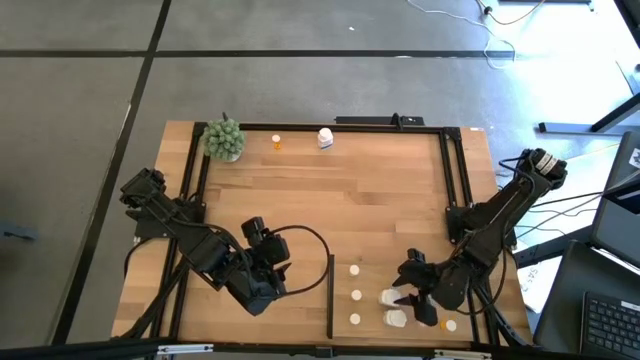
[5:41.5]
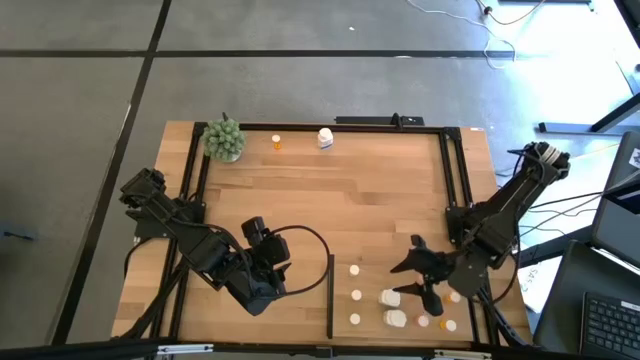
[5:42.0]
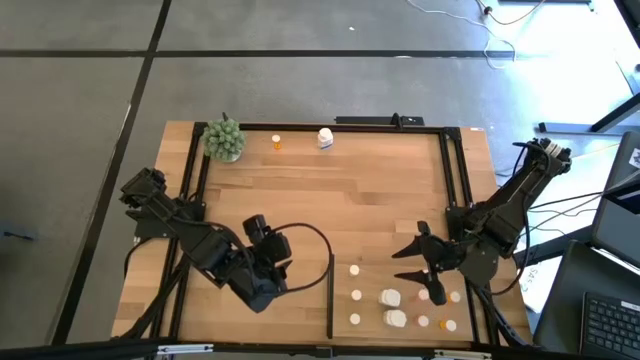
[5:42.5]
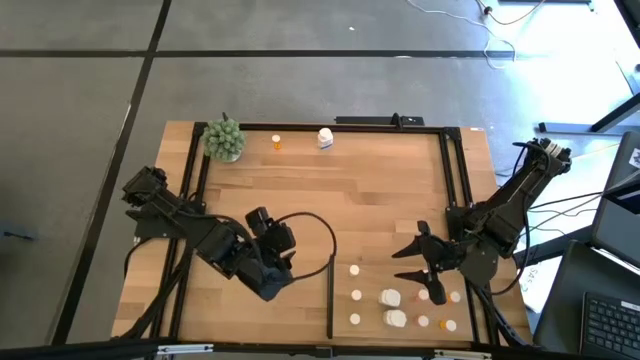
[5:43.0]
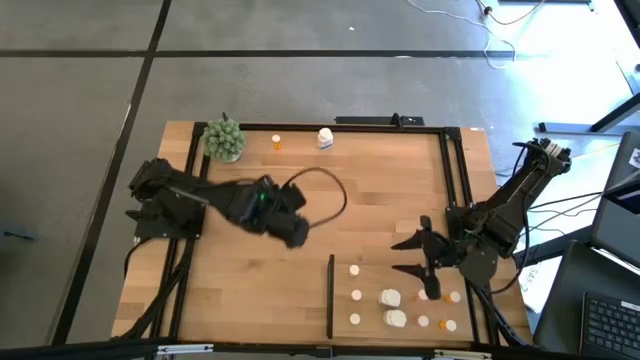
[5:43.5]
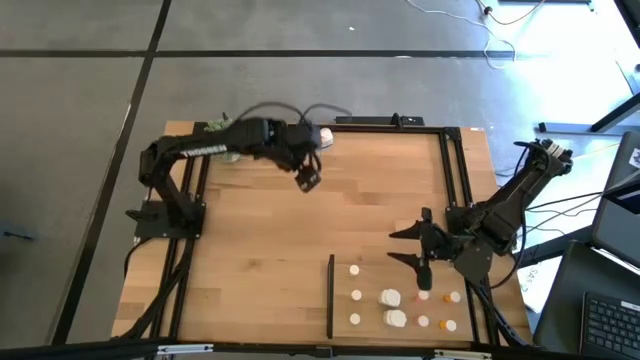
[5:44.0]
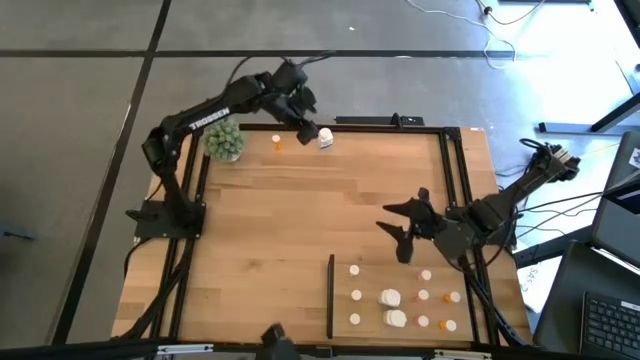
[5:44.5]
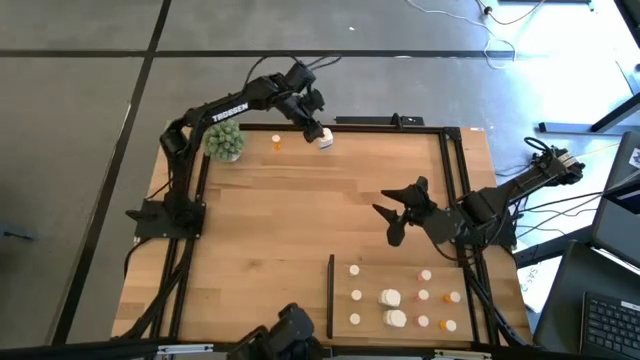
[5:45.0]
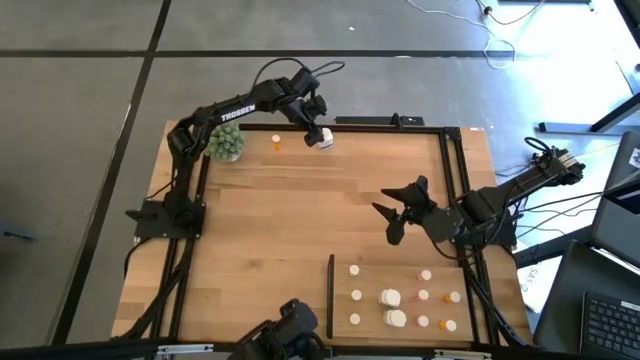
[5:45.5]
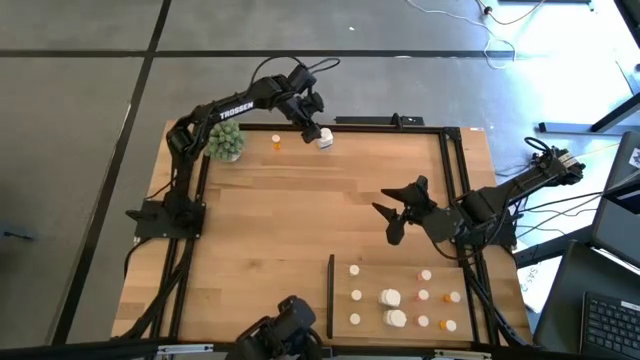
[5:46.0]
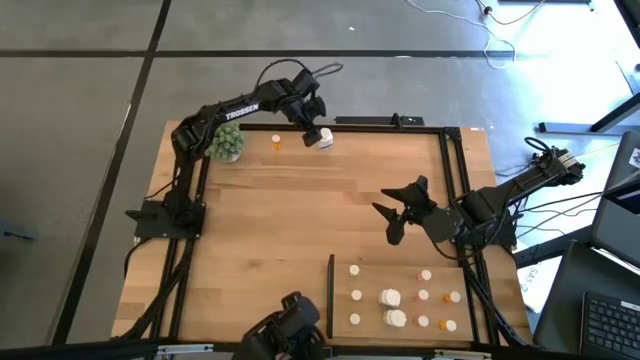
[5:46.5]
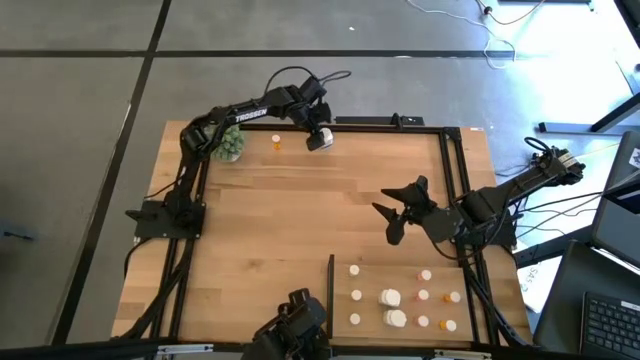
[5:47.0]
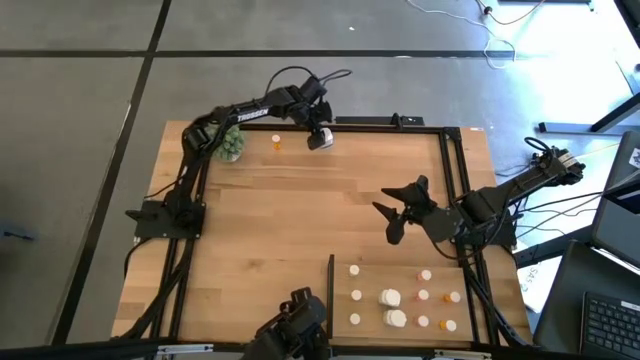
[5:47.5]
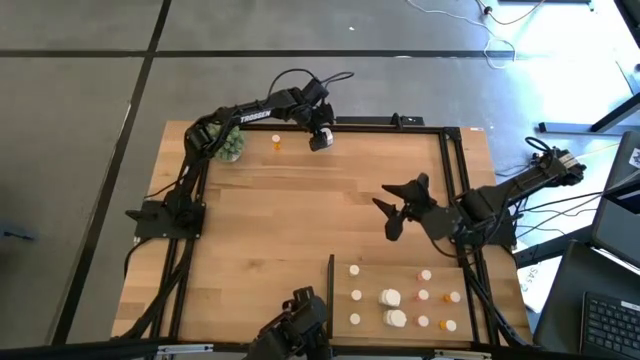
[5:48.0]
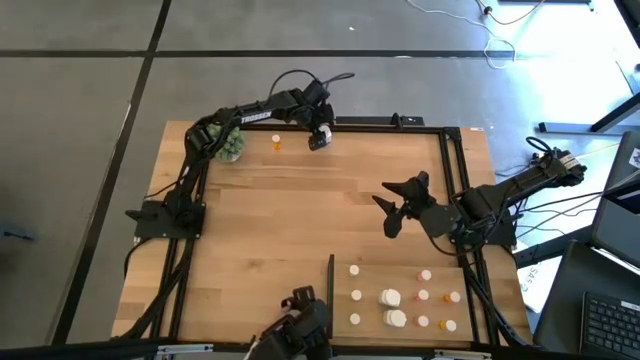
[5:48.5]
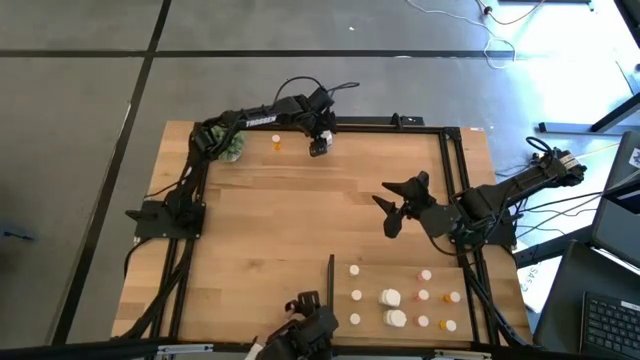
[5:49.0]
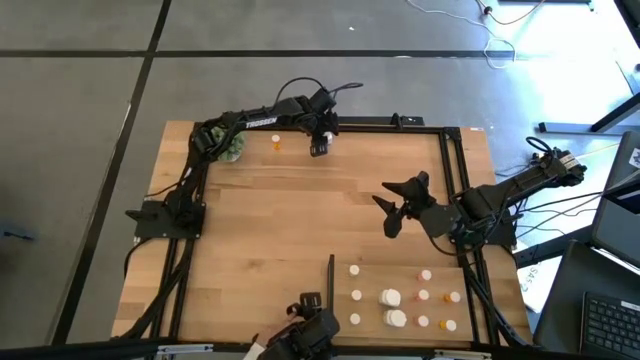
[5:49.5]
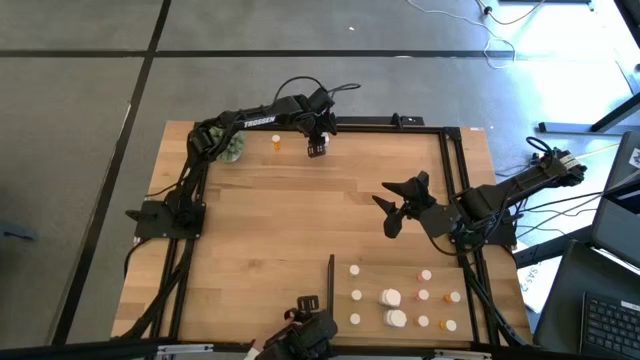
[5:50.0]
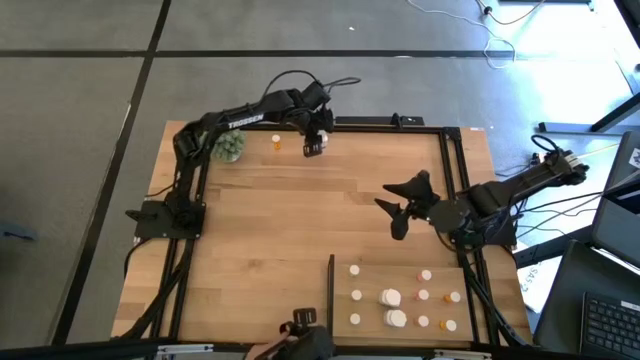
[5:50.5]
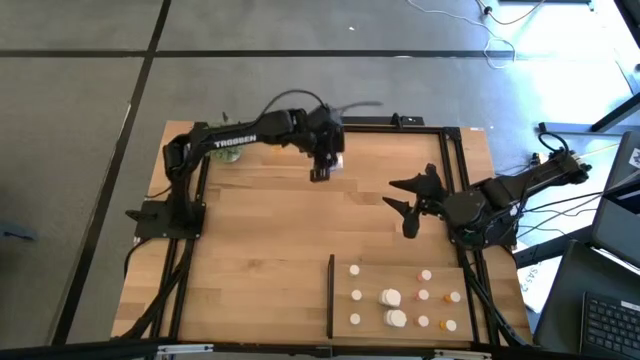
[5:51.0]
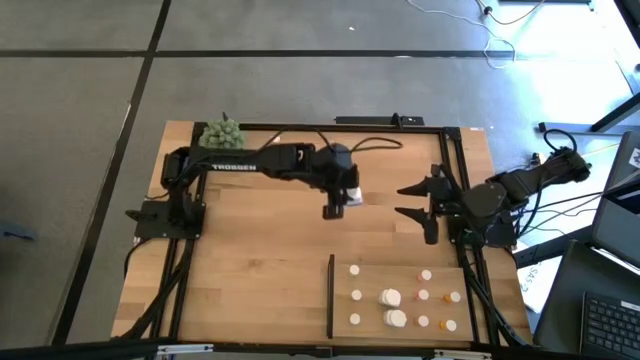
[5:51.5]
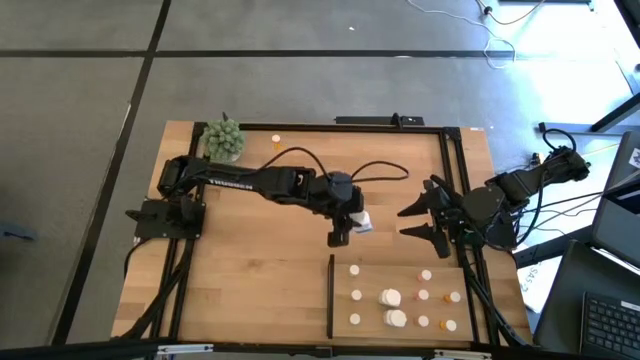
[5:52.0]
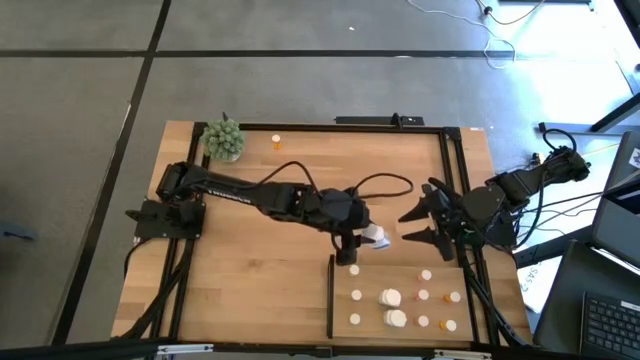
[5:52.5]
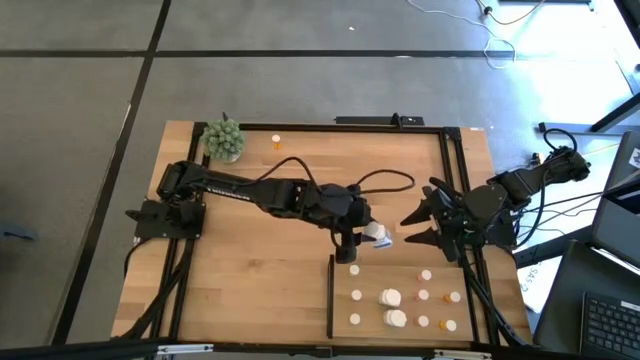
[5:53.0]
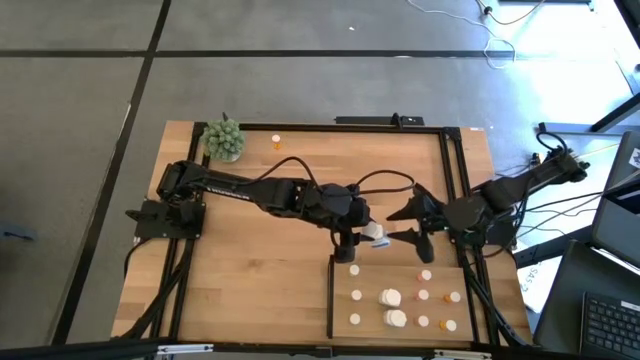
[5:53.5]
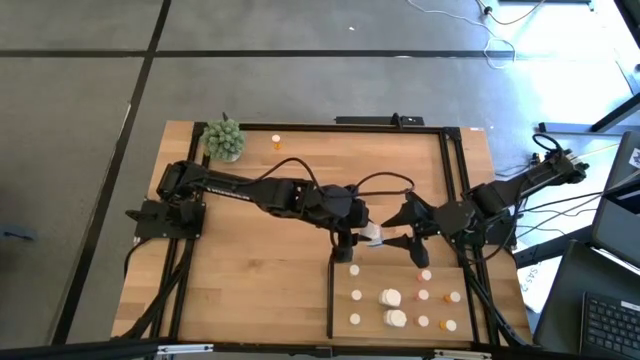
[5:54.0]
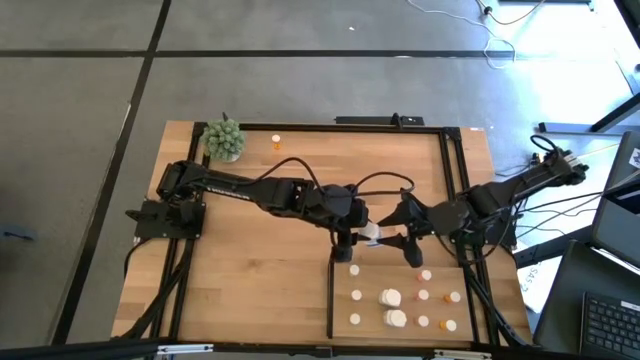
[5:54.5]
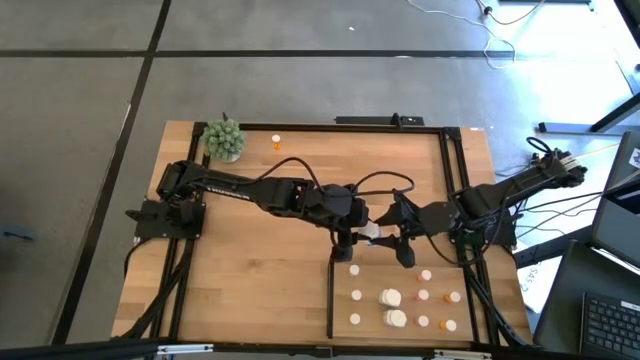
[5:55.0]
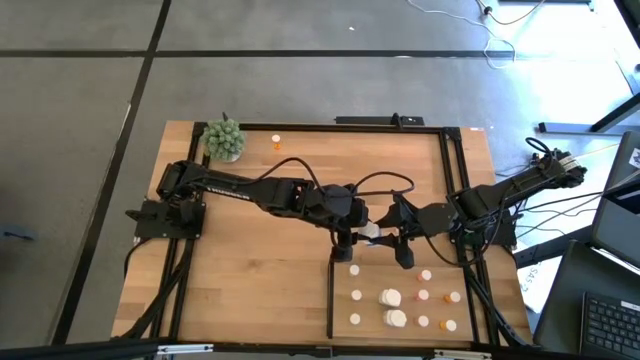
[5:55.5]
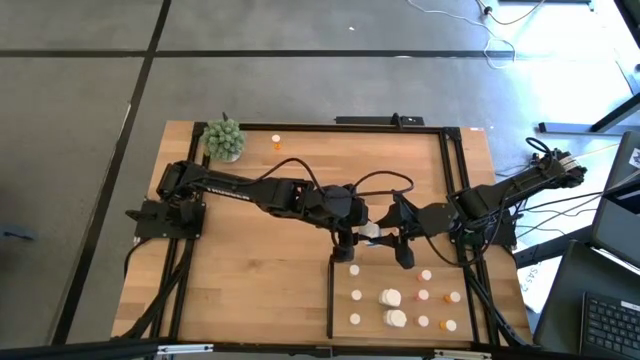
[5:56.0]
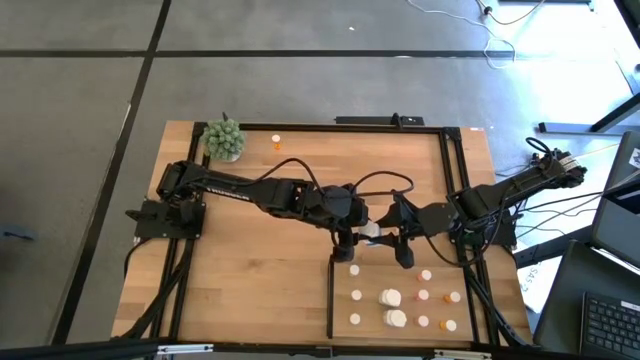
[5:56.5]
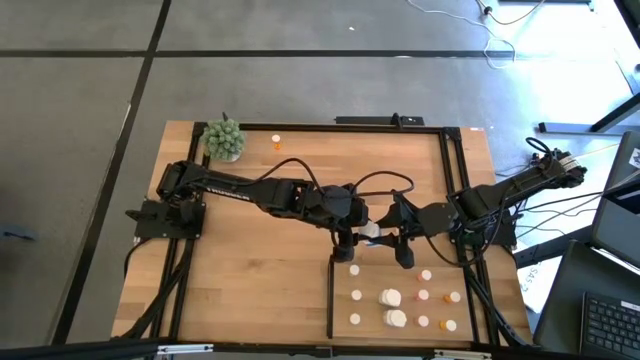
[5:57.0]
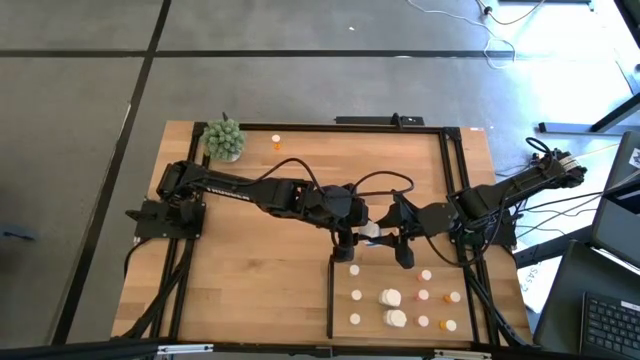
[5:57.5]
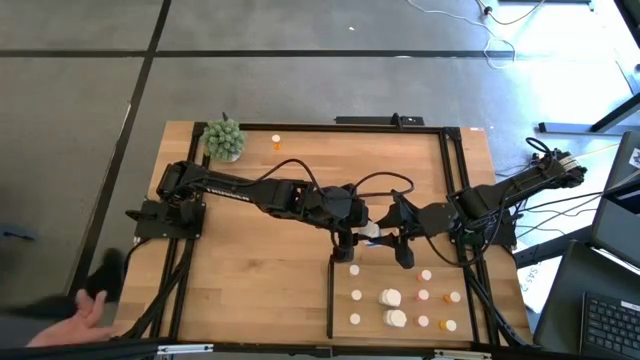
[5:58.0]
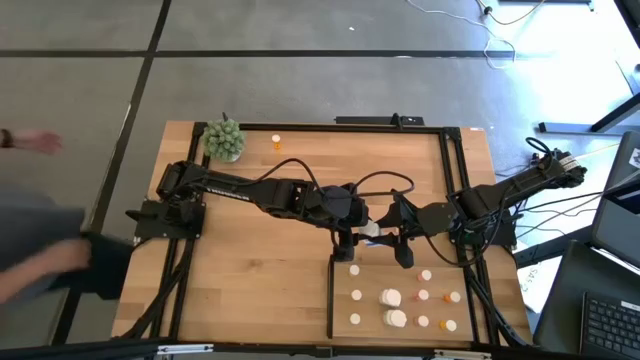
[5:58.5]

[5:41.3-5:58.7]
Task: Pick and place medicine bottles onto shelf by color
Put the supplement bottle on the shelf aligned with the other supplement bottle

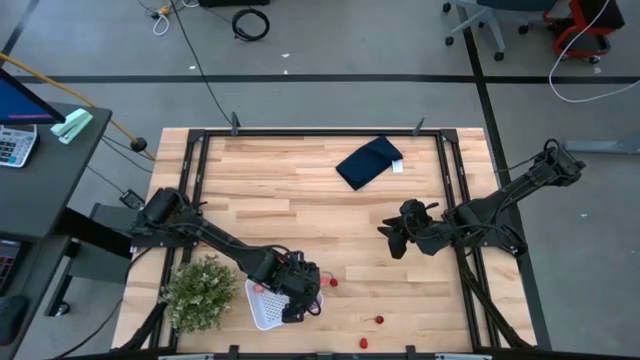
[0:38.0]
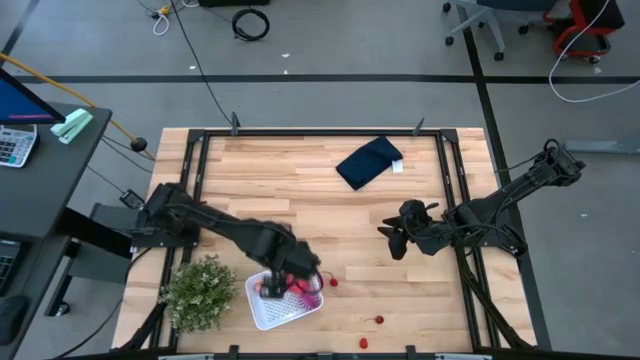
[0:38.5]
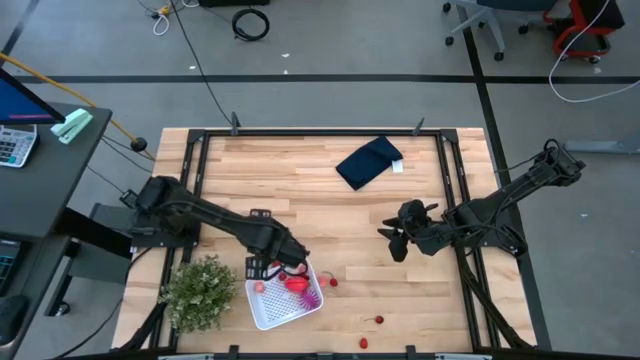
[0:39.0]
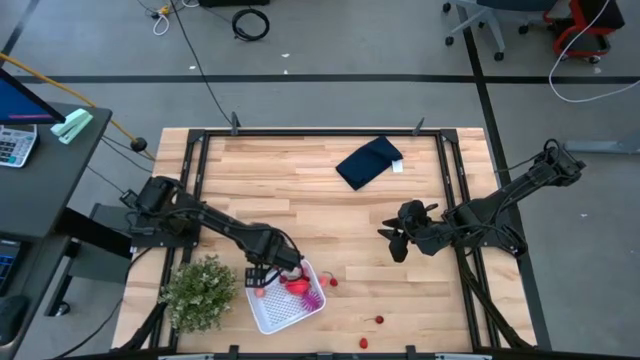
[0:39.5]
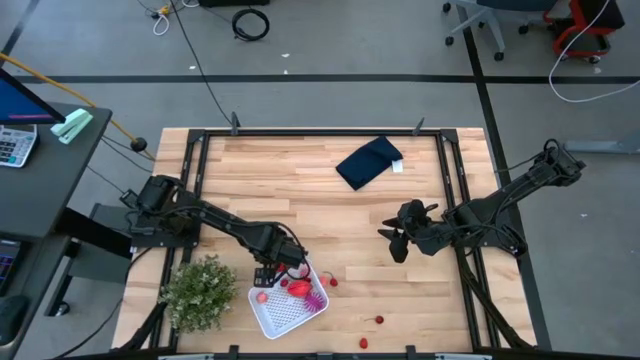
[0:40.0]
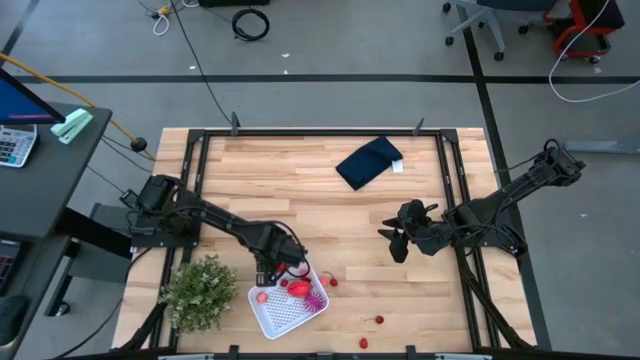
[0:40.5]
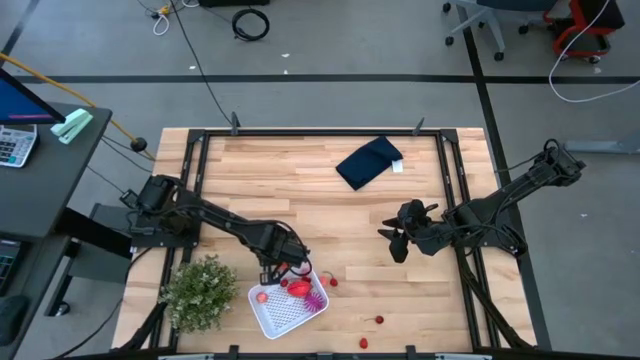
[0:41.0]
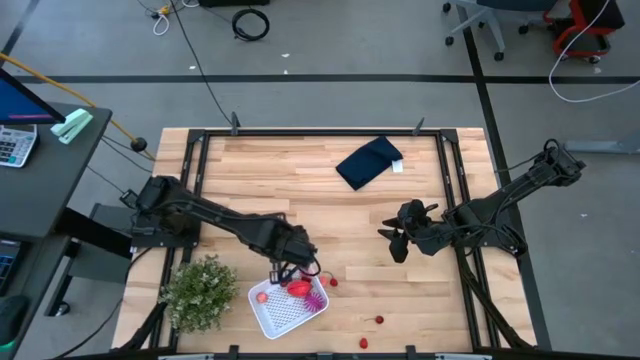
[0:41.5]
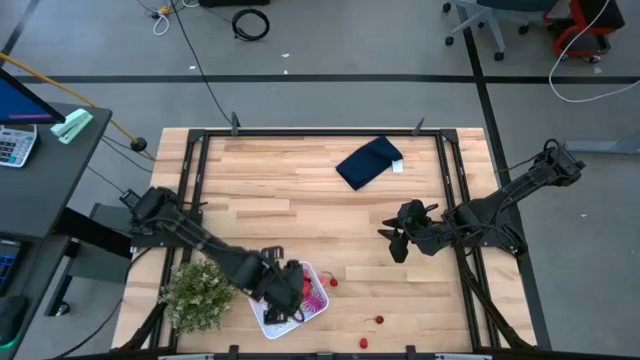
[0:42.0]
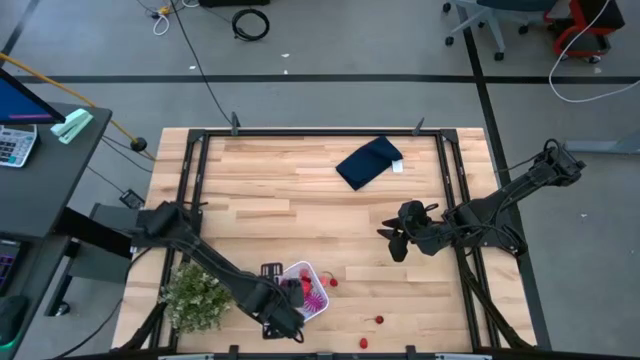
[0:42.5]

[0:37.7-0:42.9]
Task: Pick and placing Produce into tupperware
Put the strawberry into the white bin
